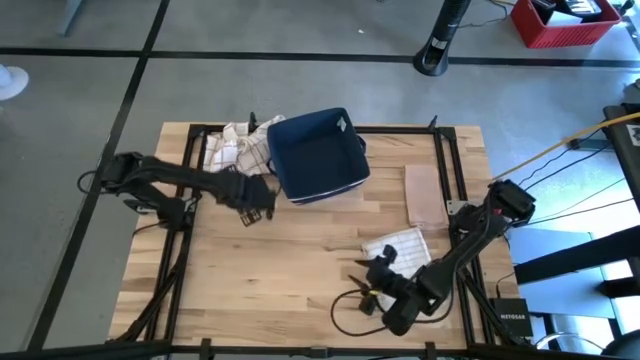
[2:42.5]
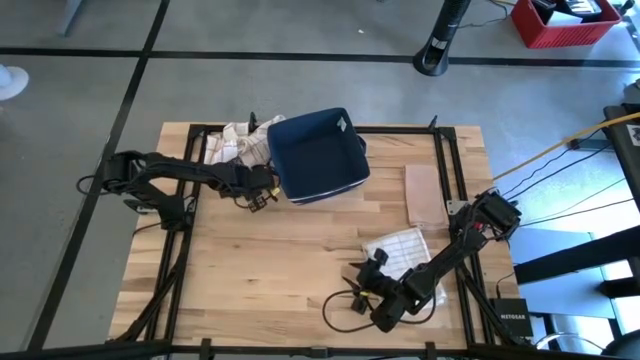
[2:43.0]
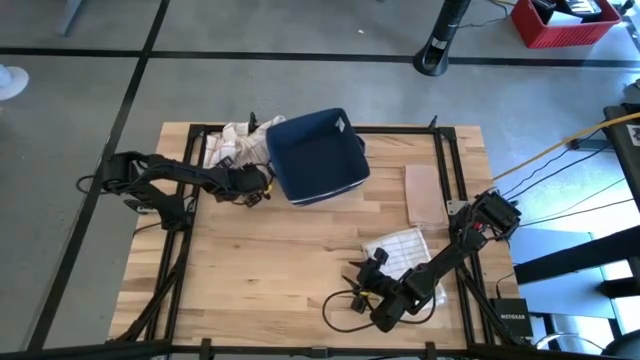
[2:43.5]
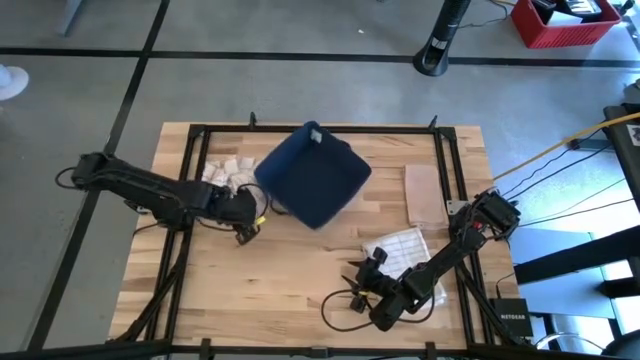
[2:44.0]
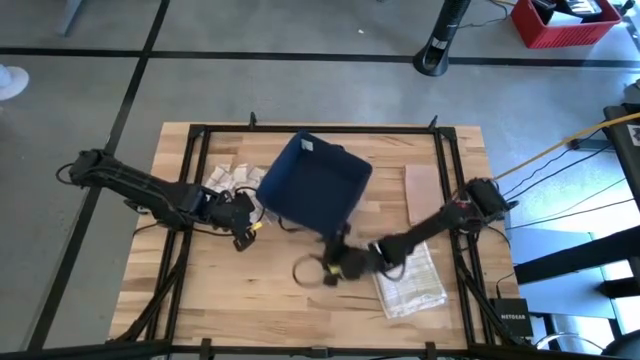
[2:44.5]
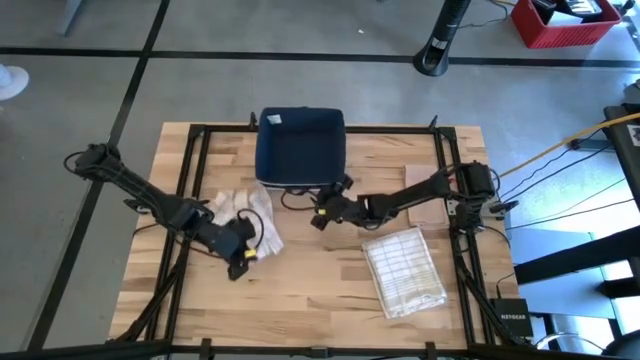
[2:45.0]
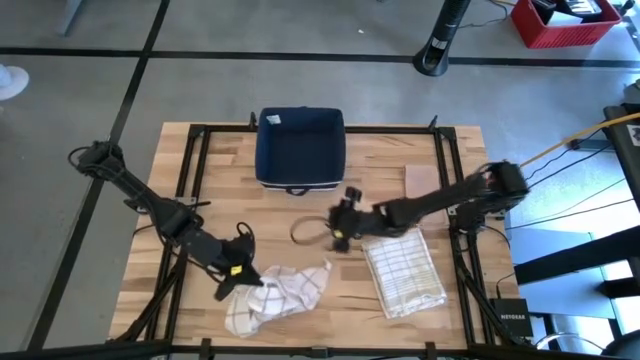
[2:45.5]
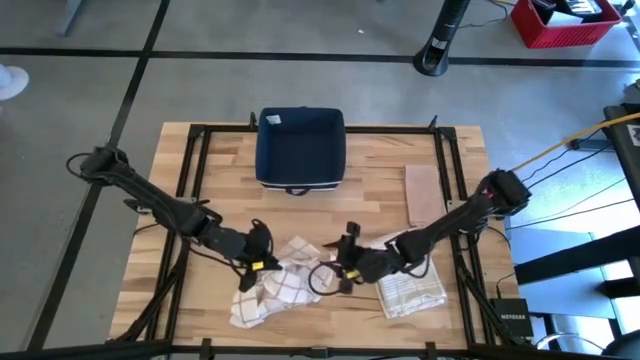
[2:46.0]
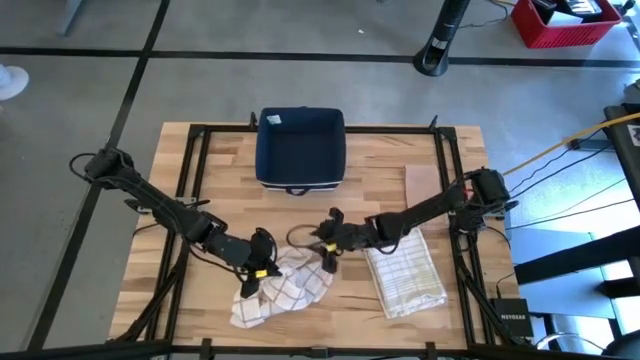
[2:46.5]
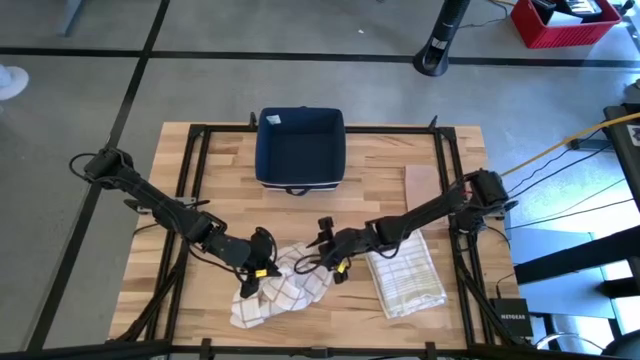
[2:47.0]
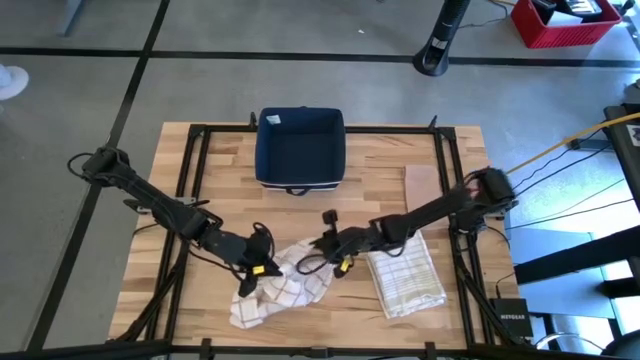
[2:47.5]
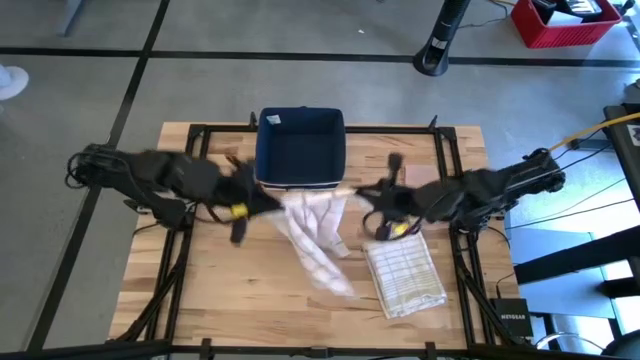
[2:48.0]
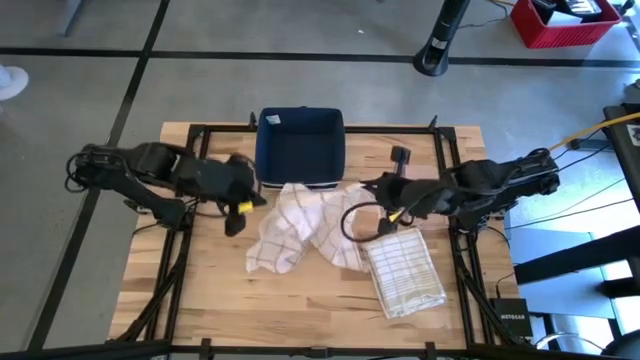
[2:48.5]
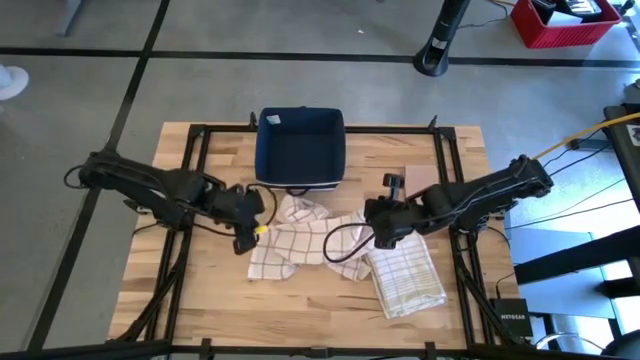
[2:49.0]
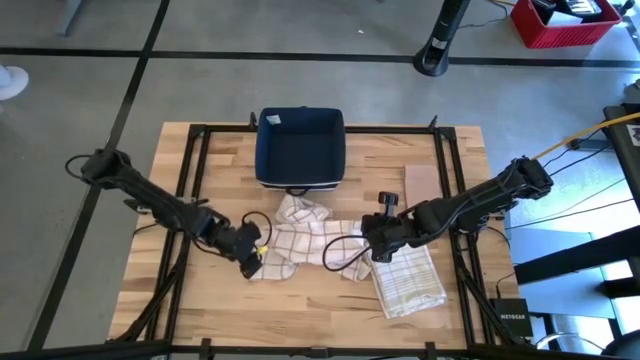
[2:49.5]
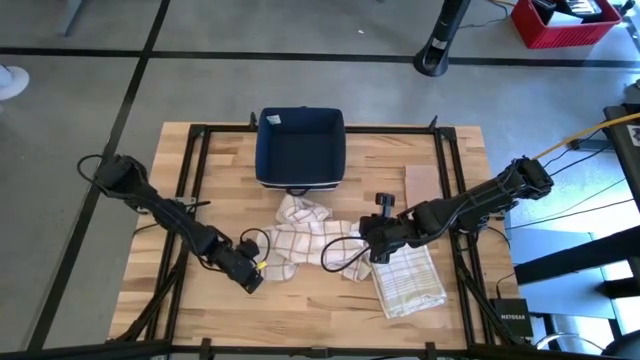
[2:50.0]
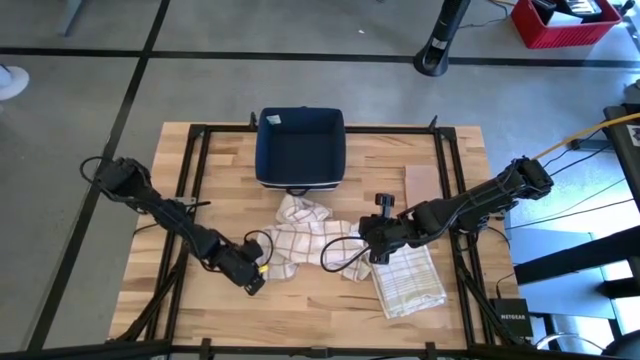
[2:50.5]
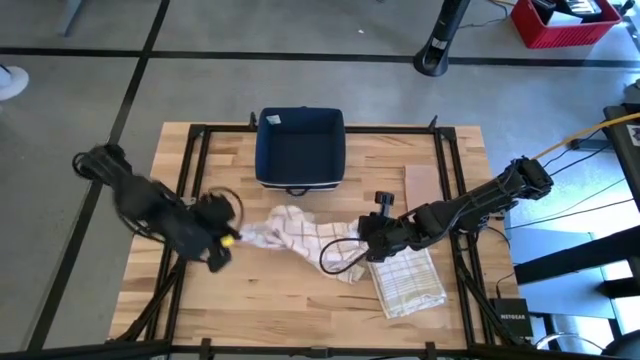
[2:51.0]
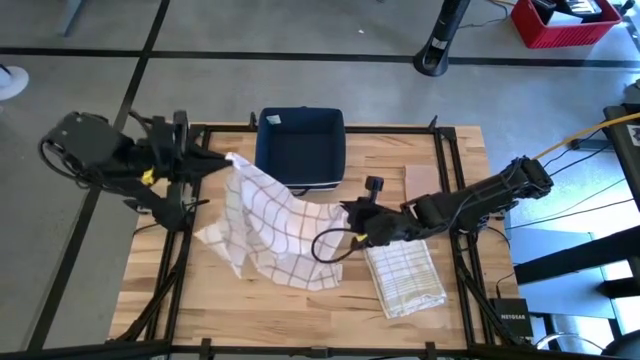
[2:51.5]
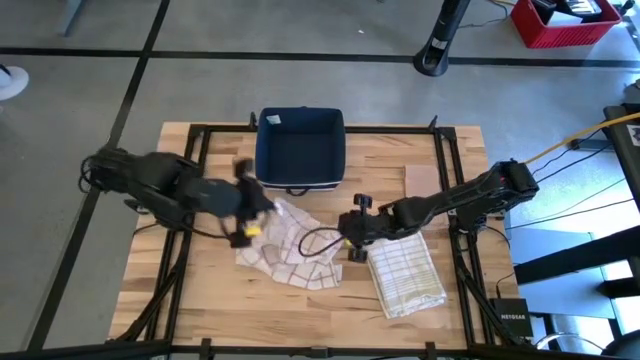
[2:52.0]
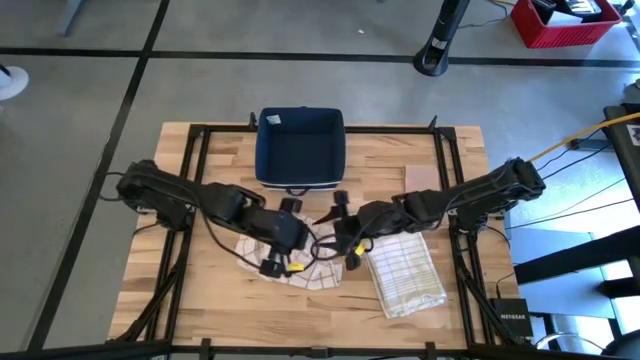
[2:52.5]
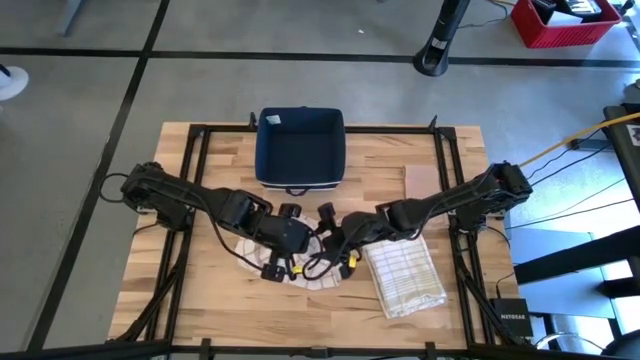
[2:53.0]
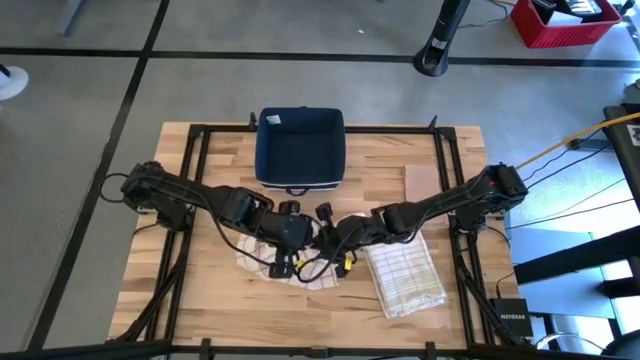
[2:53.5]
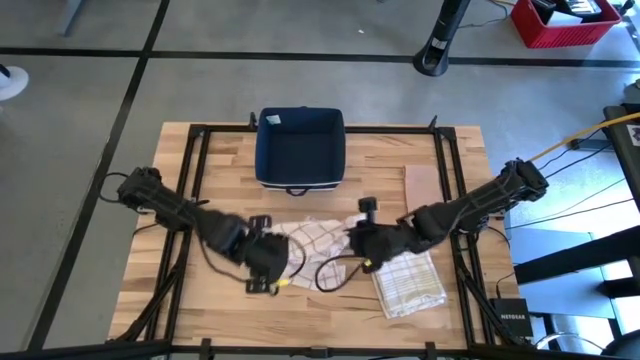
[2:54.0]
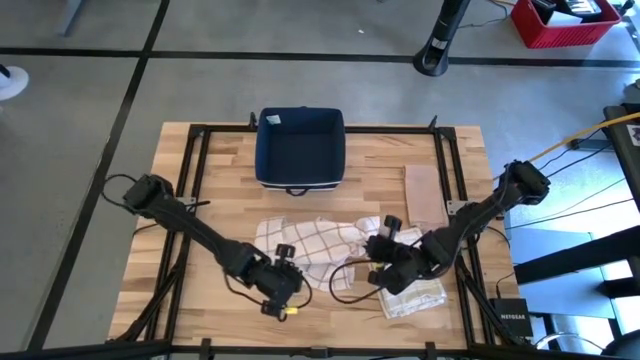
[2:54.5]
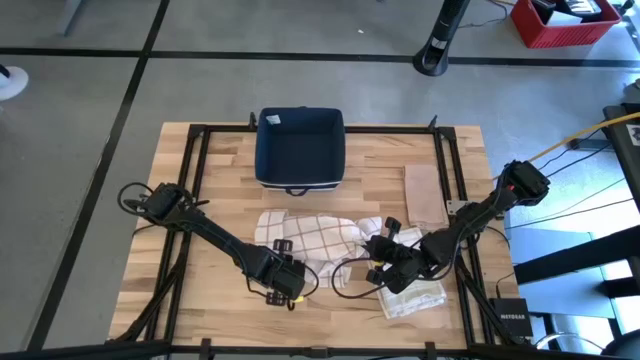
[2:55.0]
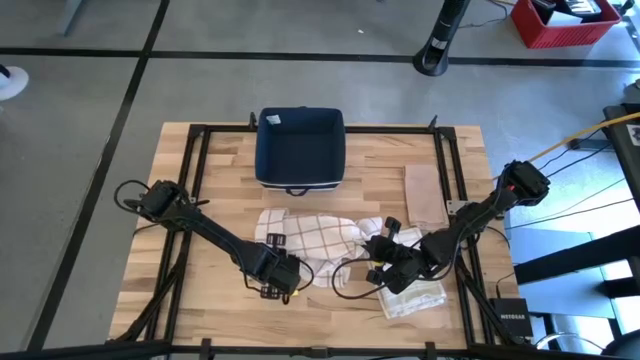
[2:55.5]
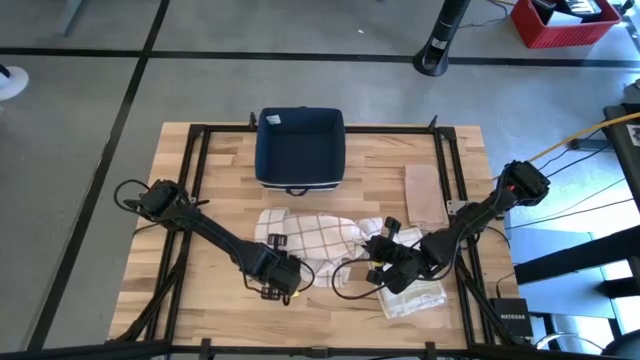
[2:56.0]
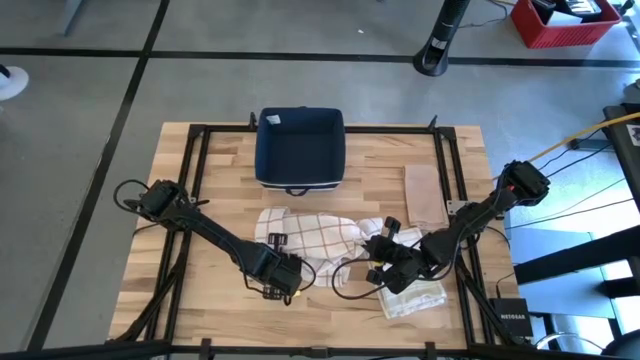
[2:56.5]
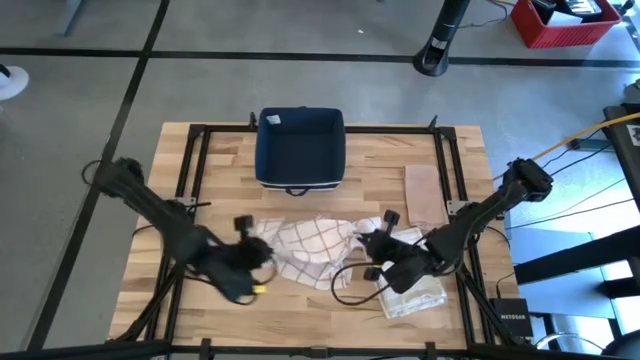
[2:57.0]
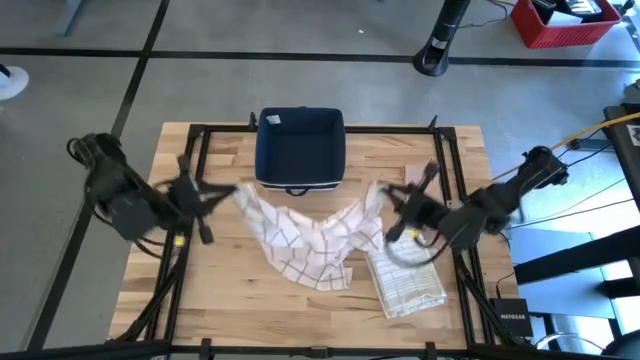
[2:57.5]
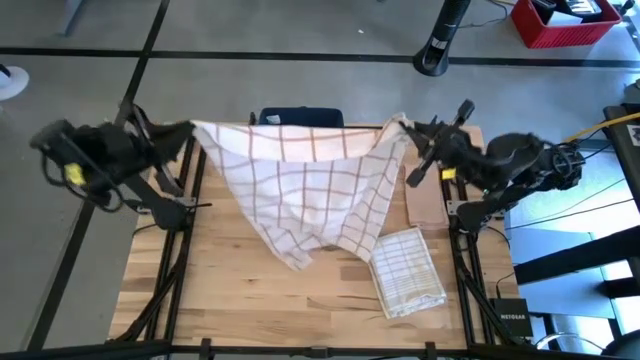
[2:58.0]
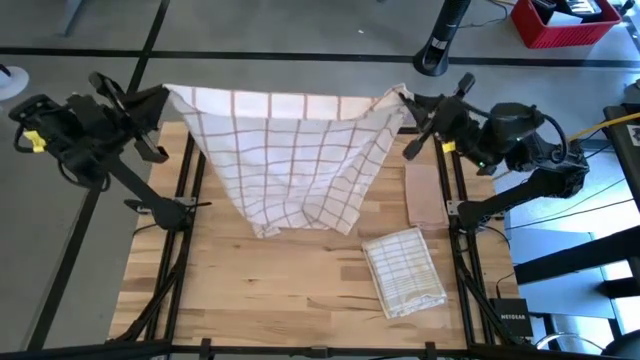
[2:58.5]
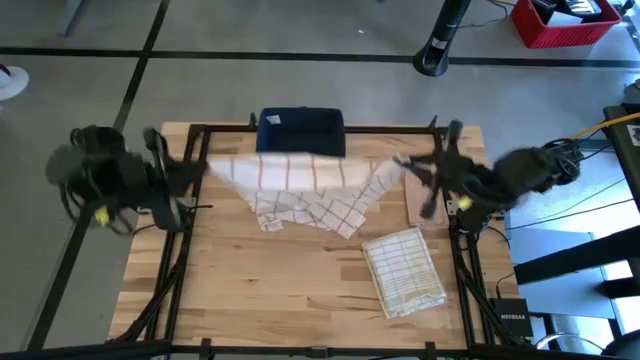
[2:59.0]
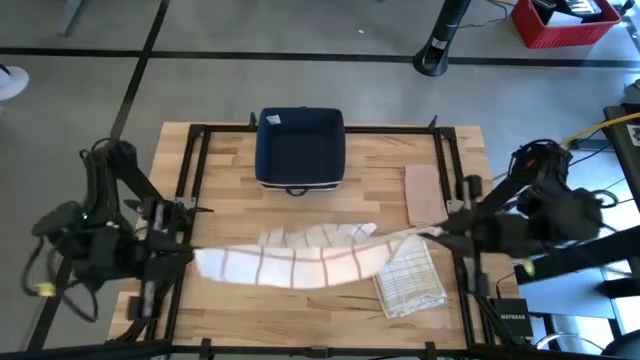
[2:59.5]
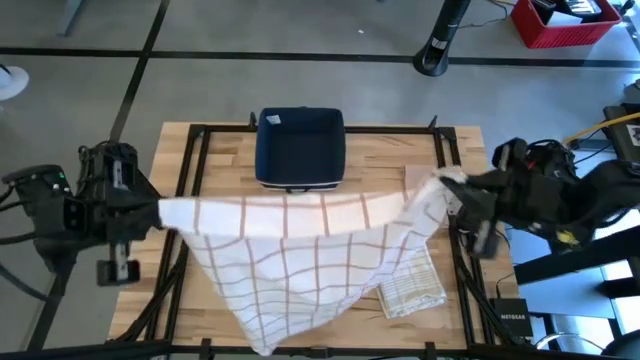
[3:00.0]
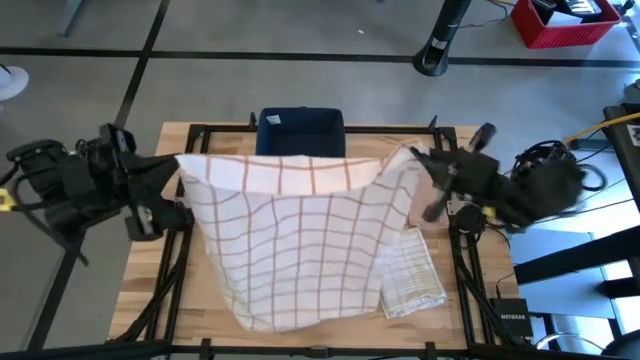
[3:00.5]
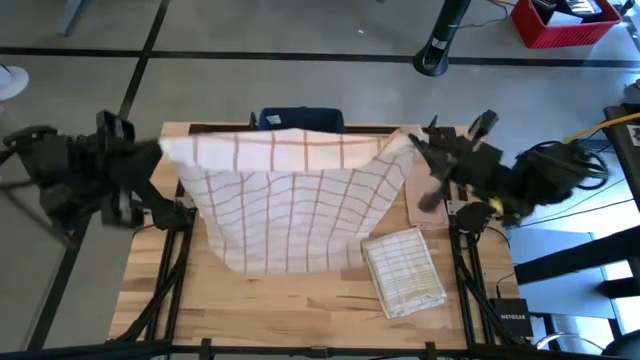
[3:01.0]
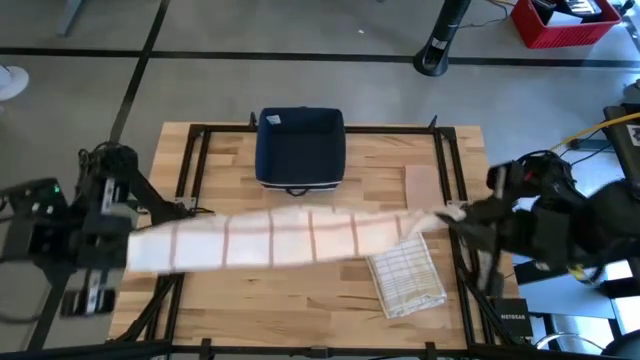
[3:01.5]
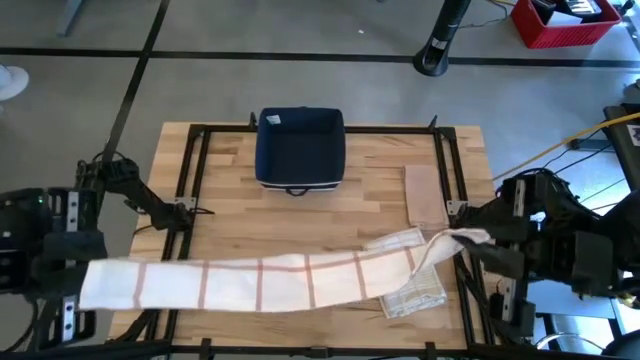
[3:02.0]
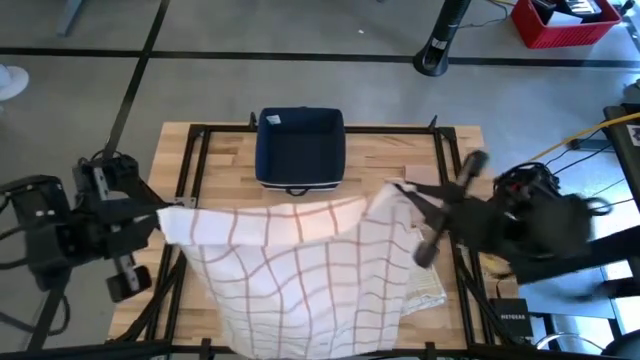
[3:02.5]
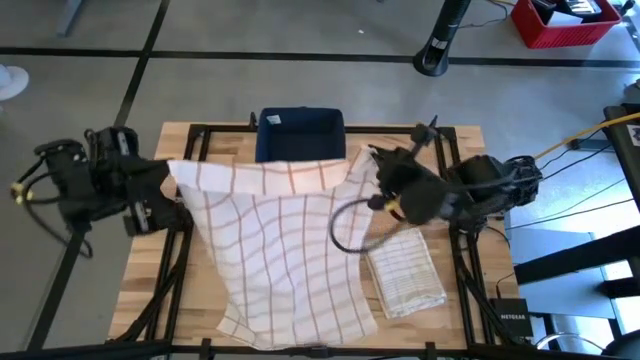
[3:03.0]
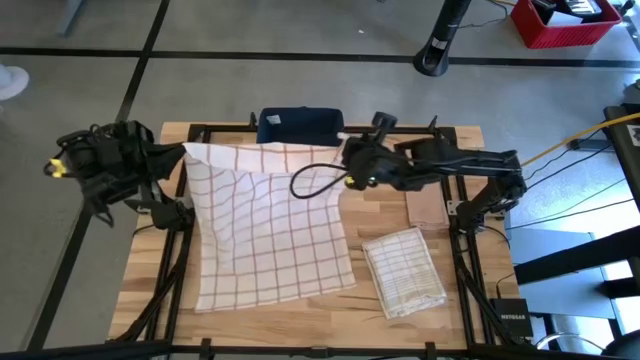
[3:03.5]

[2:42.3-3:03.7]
Task: Fold towel
Fold the white with brown pattern towel on the table
